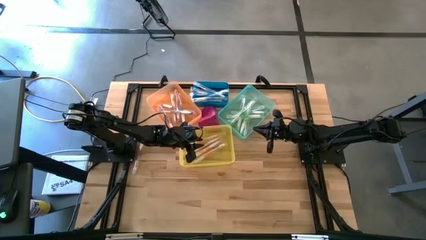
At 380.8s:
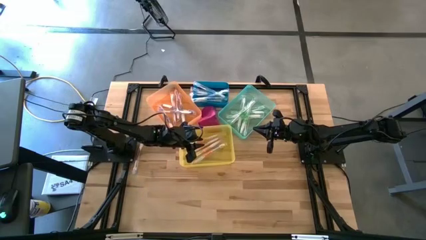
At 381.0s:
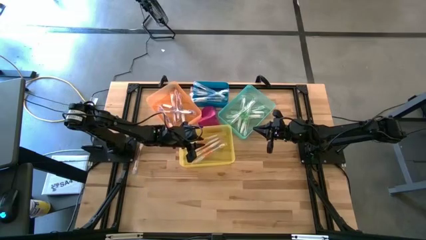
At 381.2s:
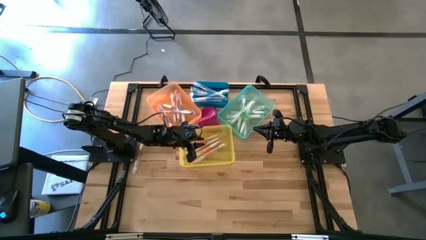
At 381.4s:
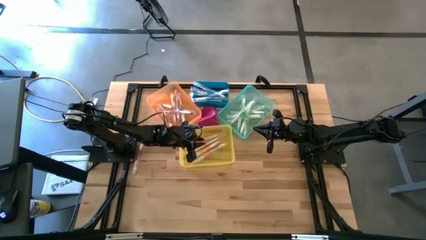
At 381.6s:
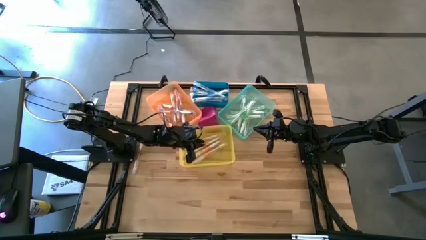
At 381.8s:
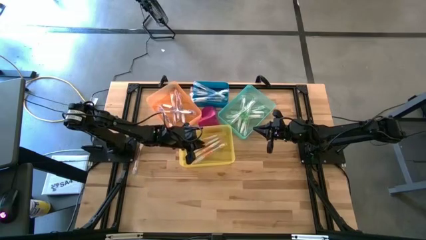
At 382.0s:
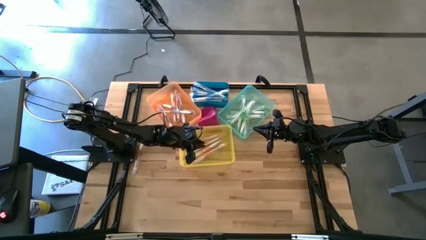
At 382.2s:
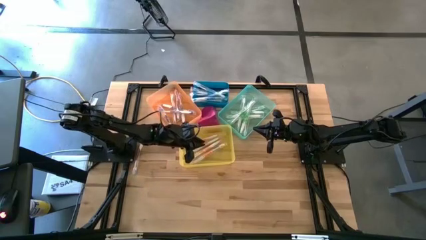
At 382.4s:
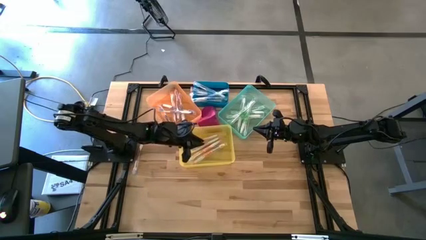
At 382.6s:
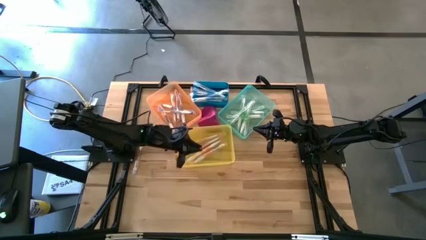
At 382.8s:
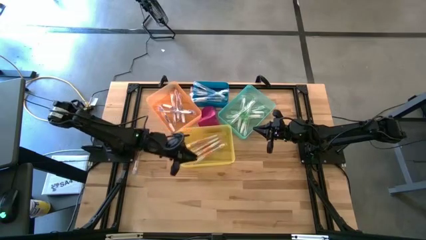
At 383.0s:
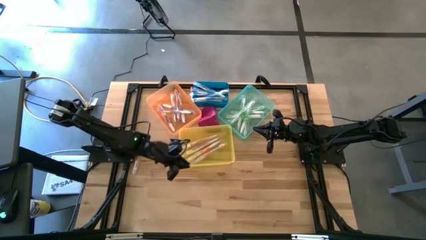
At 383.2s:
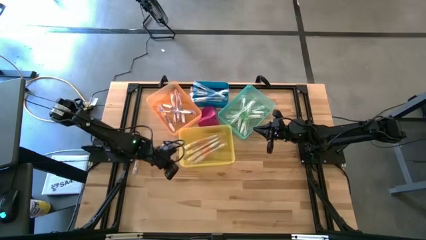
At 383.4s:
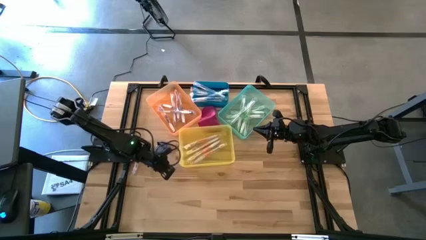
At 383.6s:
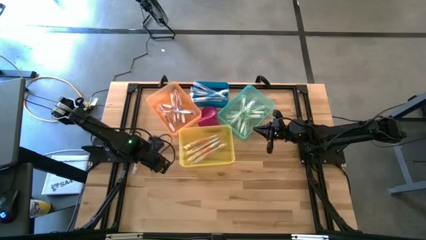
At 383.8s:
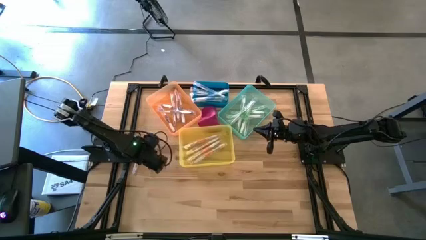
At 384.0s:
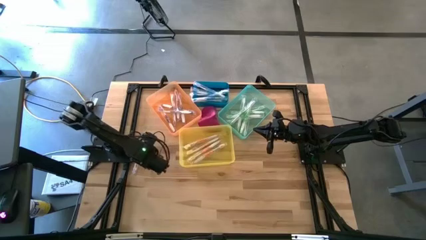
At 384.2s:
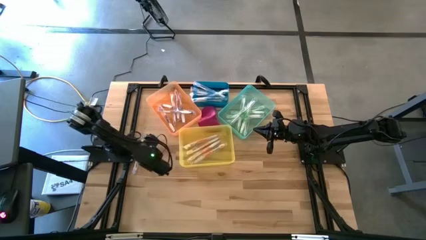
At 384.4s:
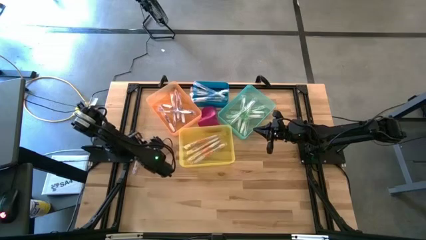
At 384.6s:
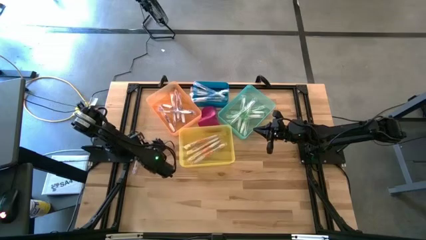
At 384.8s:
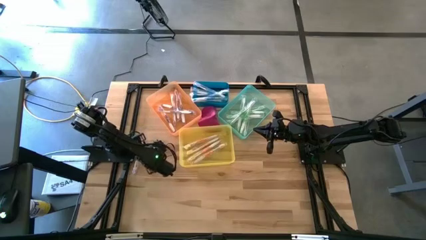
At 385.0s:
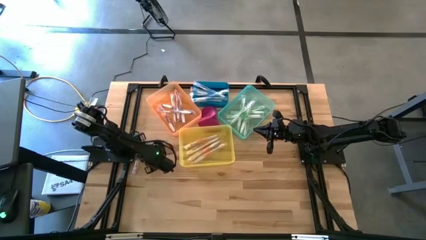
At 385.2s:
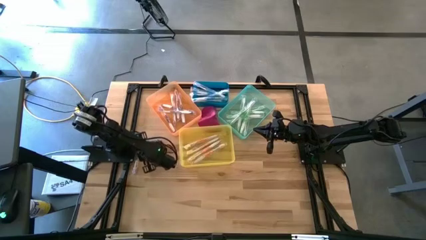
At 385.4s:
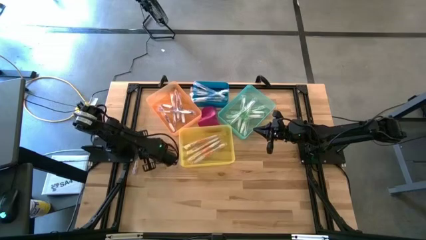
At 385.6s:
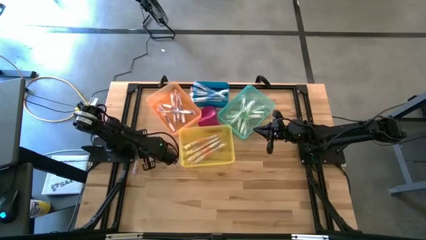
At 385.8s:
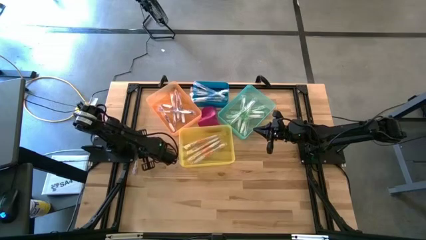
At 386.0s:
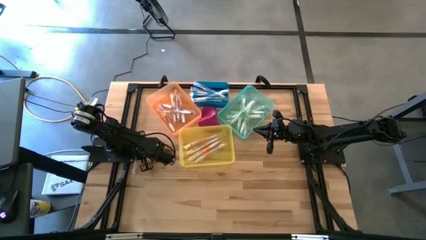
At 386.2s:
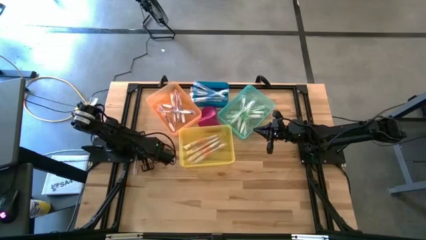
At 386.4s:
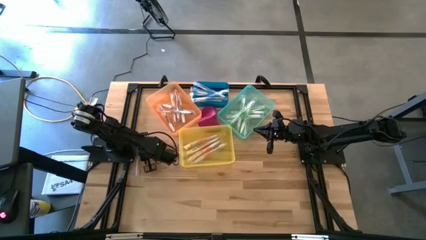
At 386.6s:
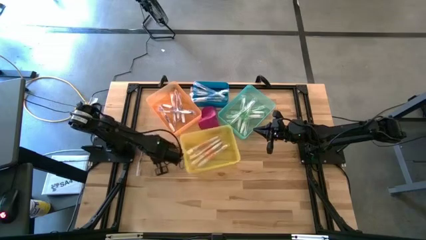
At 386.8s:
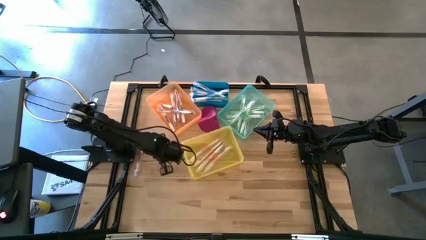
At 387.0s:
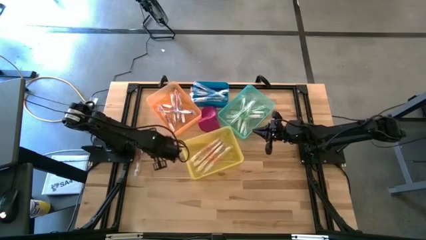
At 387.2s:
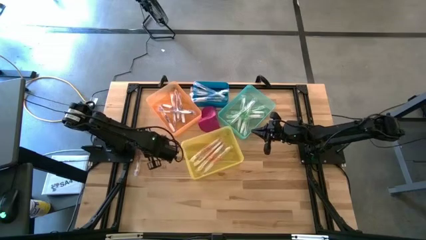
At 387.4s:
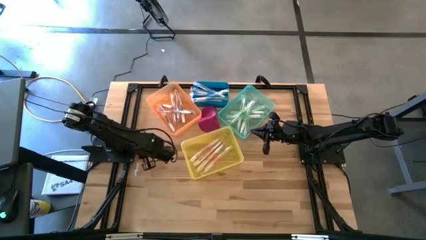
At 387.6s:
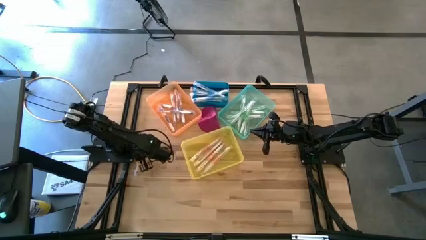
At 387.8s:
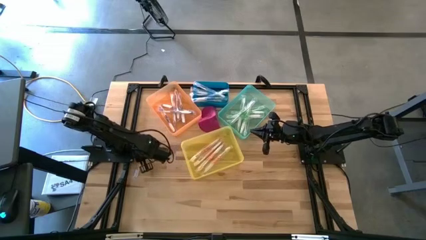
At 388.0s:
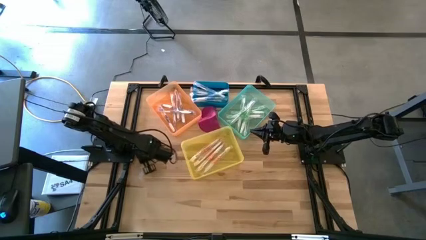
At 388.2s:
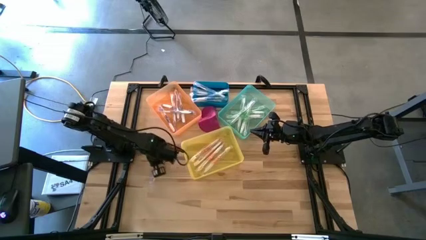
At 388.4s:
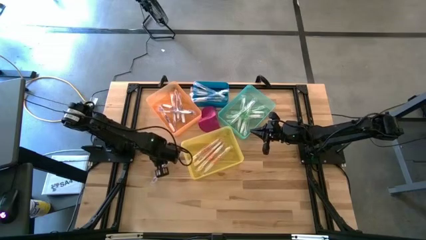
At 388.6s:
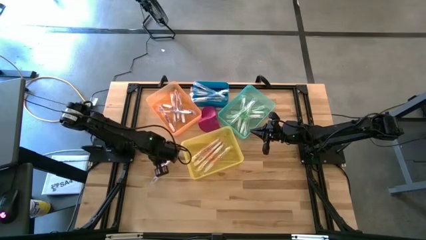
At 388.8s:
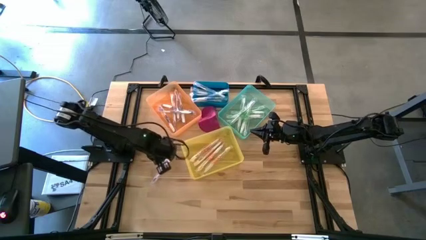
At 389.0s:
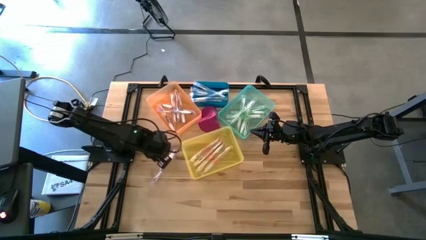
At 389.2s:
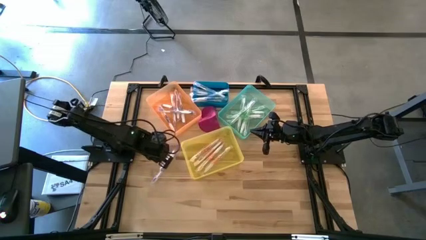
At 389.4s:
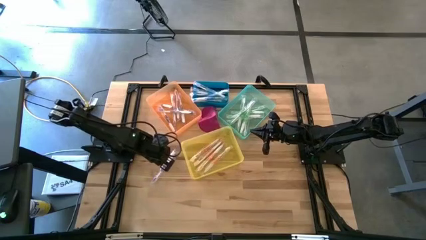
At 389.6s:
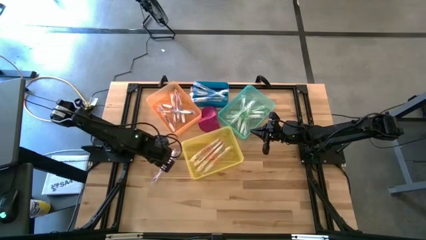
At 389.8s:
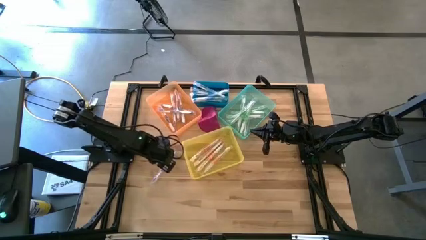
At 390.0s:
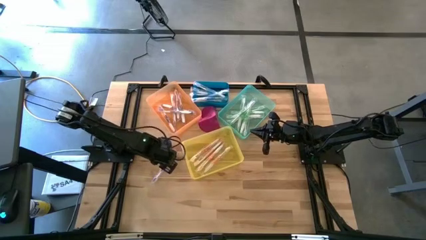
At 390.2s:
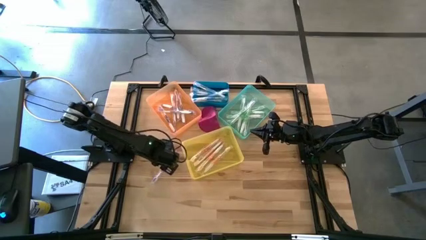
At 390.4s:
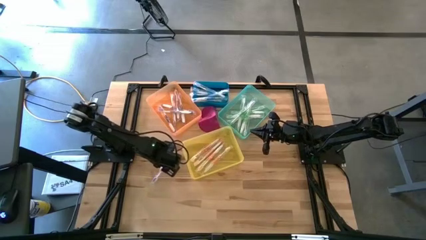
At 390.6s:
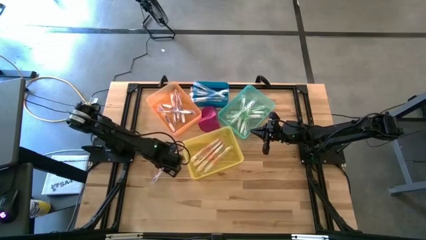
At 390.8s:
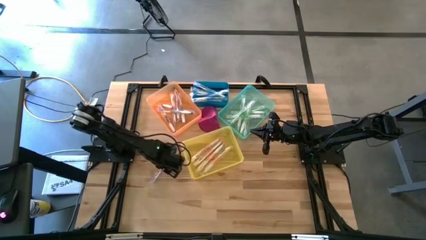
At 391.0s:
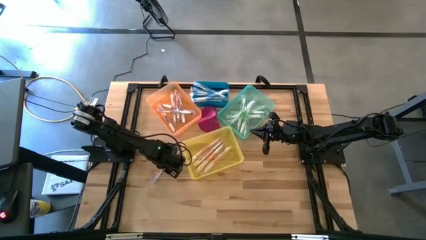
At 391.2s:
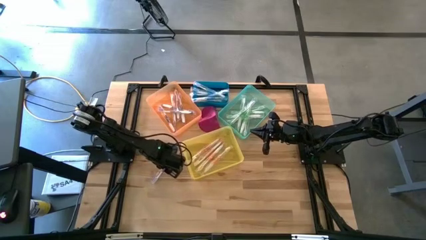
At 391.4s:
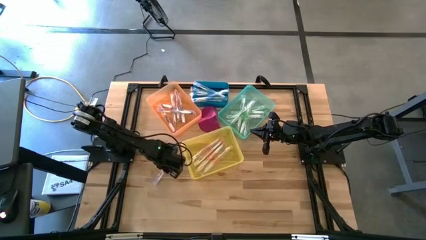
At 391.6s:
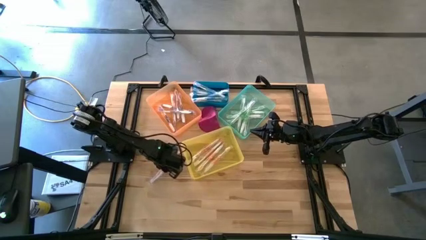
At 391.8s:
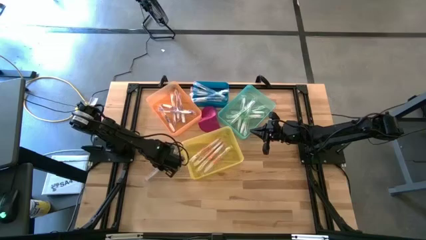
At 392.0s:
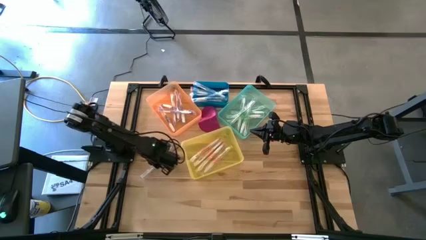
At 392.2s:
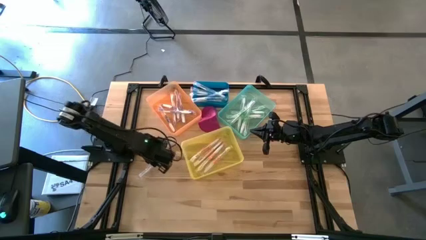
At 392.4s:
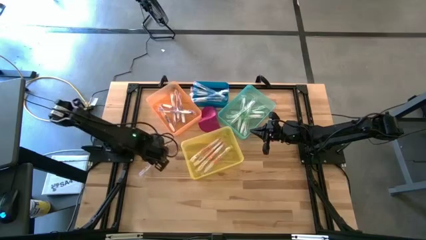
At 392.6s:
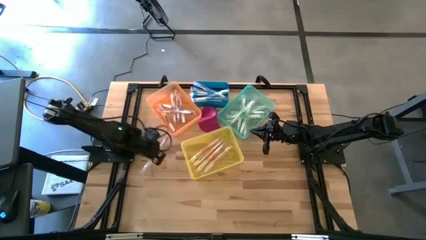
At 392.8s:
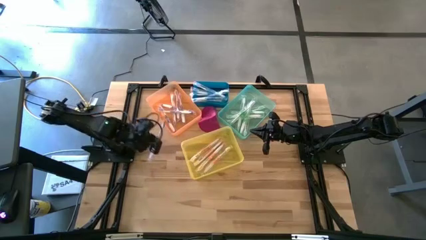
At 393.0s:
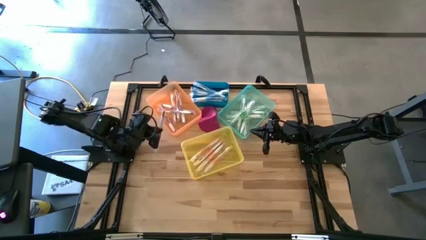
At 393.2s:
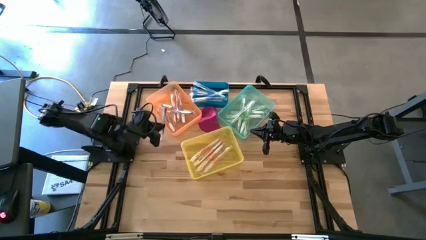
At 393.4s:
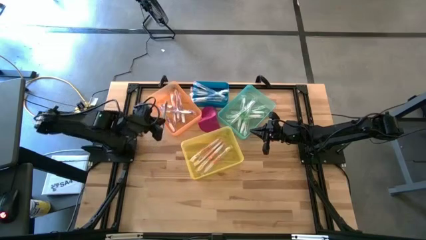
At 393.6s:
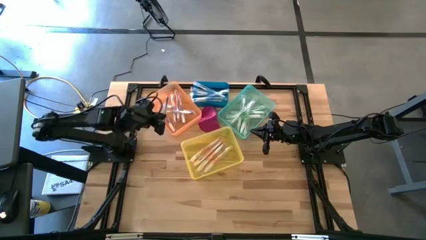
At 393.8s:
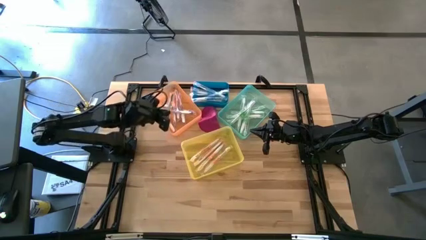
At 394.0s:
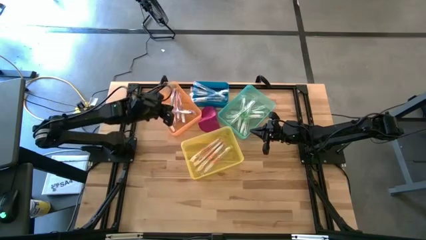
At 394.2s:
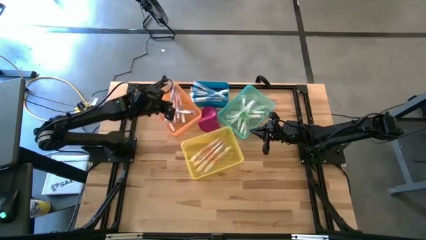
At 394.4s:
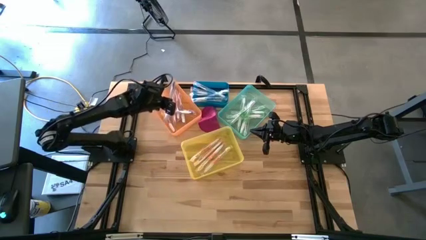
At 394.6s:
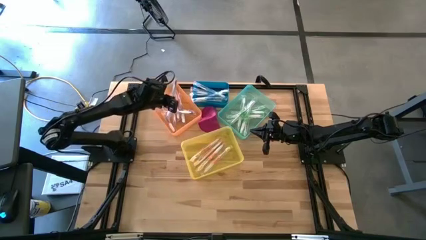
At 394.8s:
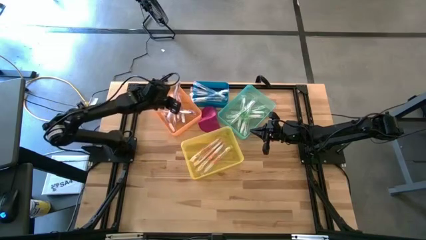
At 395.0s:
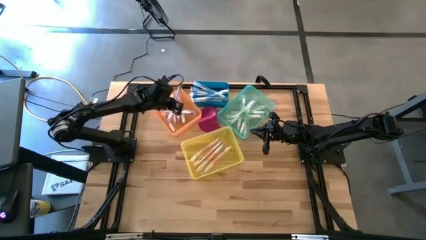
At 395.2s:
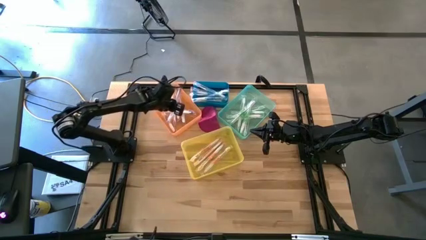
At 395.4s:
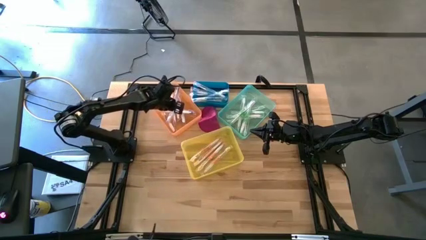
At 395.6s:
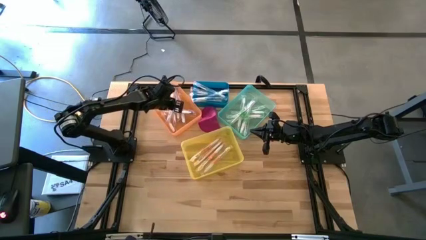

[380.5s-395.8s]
Task: Pick & Place Toothbrushes
Put the purple toothbrush into the orange bin
